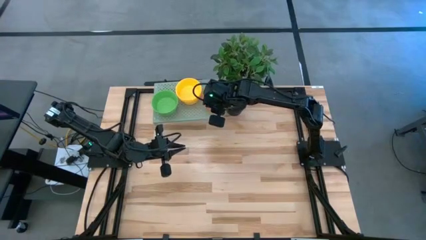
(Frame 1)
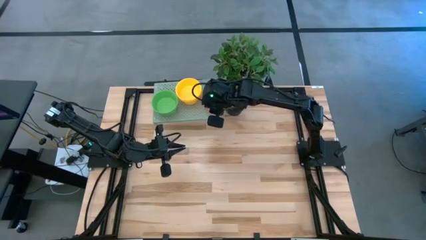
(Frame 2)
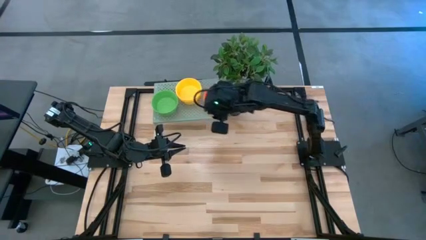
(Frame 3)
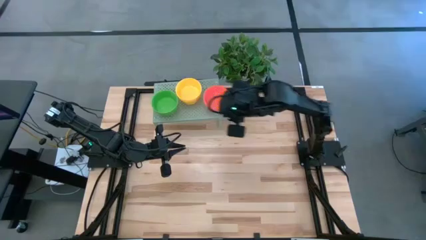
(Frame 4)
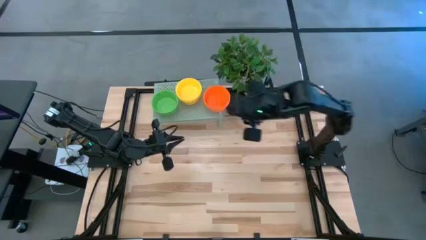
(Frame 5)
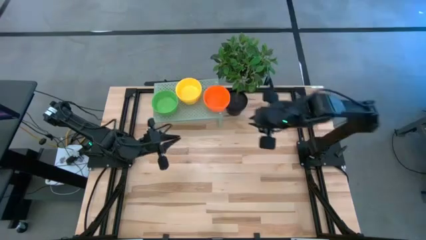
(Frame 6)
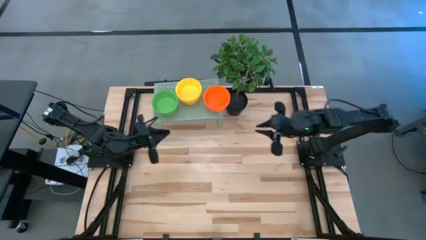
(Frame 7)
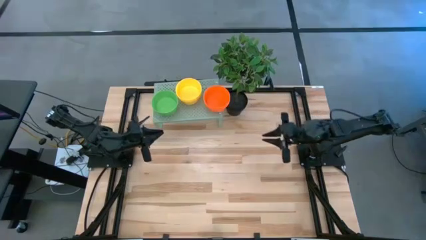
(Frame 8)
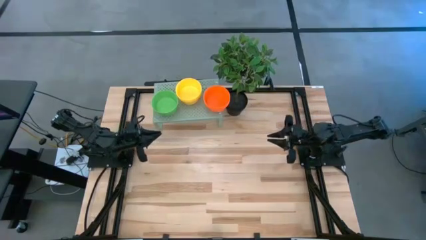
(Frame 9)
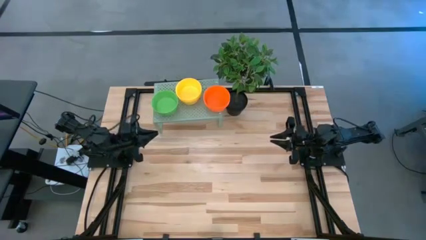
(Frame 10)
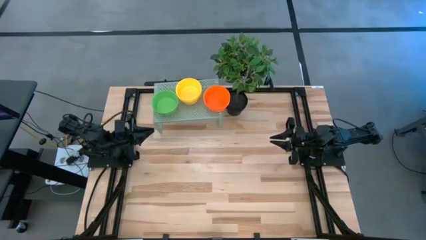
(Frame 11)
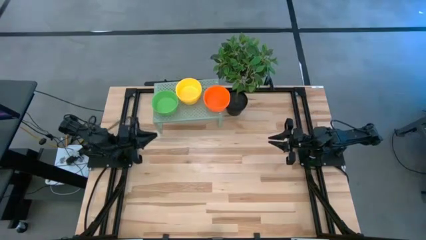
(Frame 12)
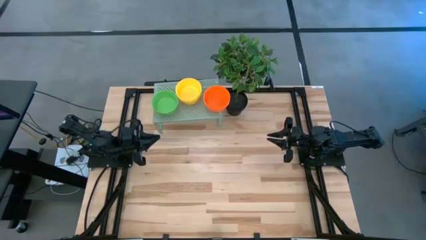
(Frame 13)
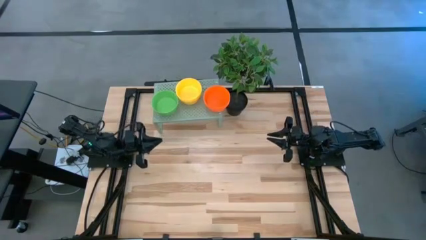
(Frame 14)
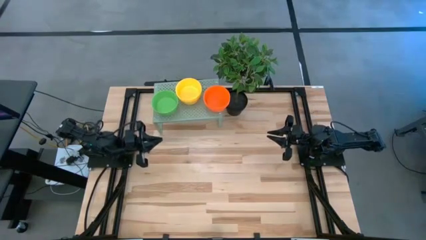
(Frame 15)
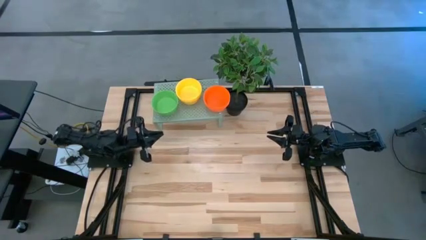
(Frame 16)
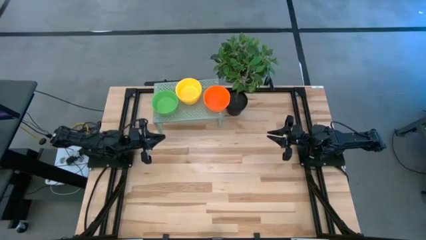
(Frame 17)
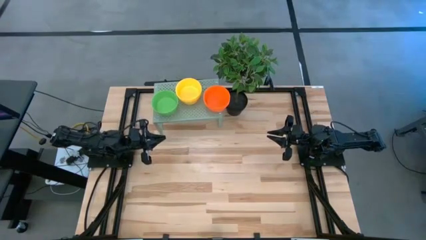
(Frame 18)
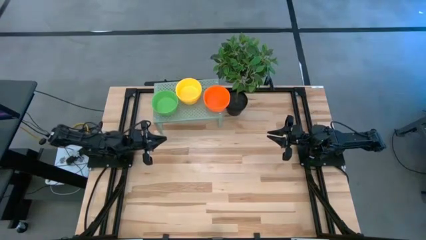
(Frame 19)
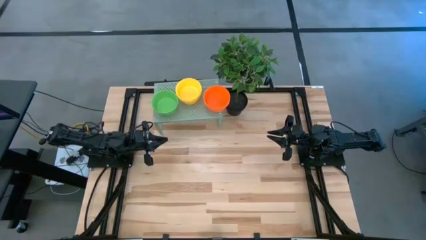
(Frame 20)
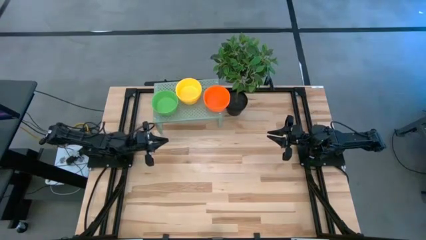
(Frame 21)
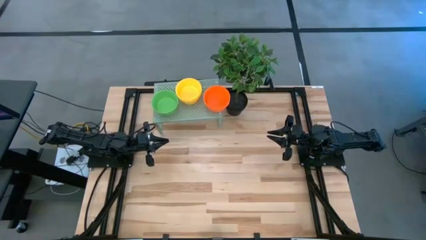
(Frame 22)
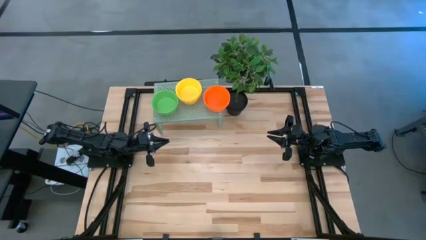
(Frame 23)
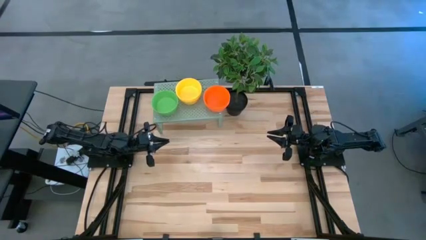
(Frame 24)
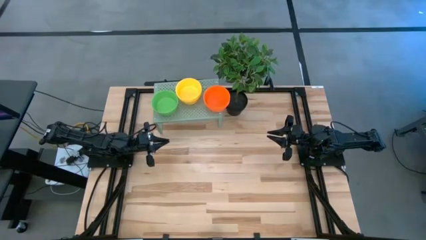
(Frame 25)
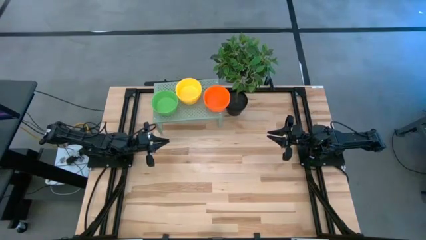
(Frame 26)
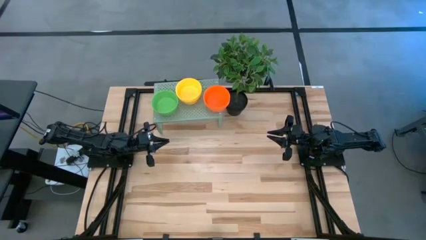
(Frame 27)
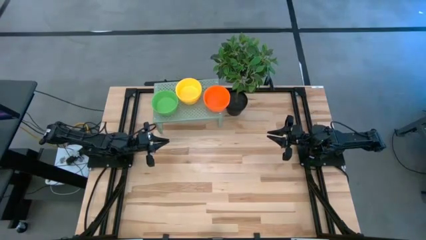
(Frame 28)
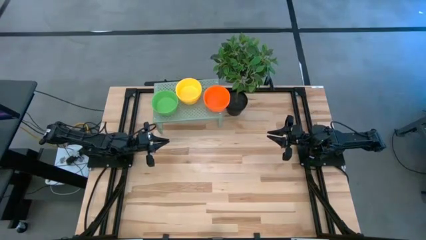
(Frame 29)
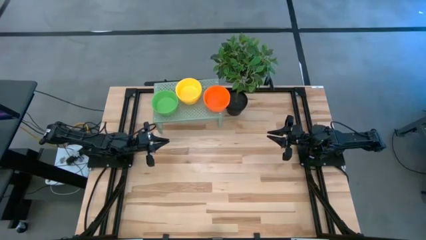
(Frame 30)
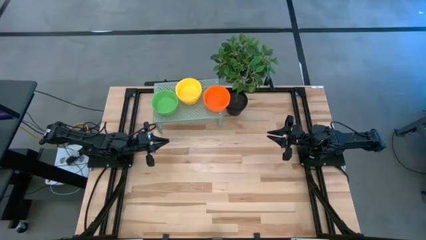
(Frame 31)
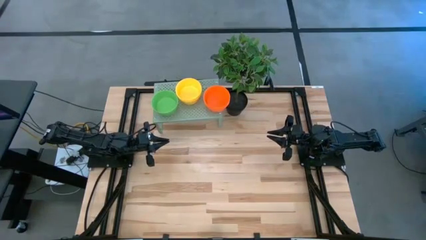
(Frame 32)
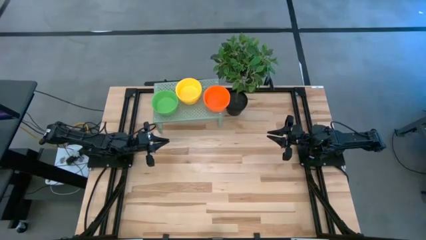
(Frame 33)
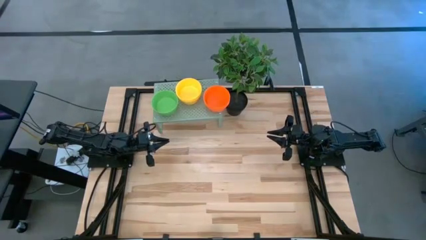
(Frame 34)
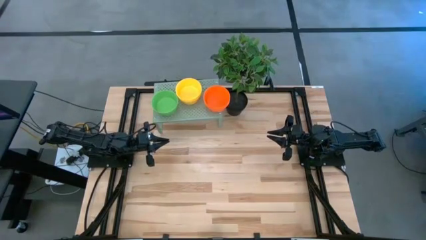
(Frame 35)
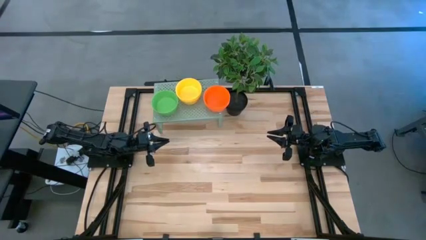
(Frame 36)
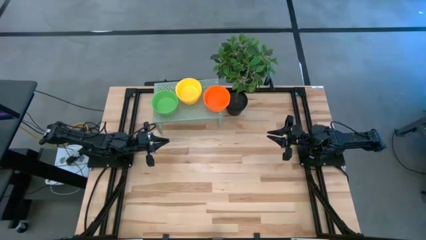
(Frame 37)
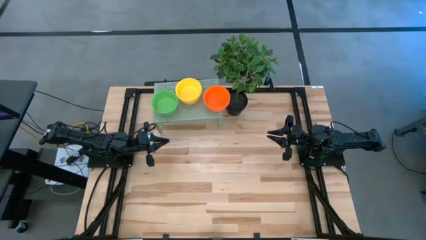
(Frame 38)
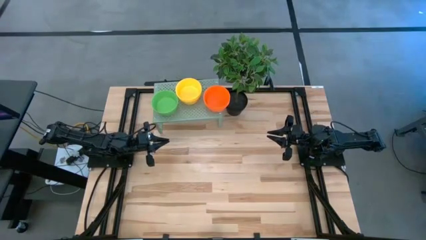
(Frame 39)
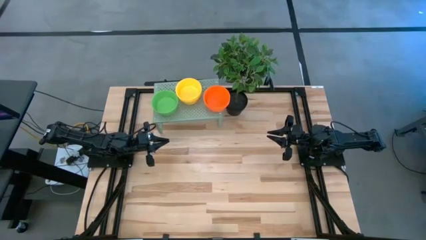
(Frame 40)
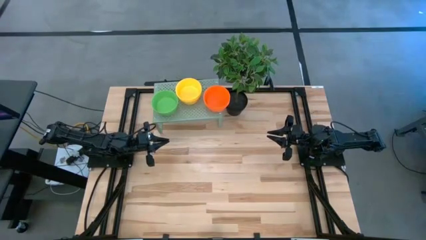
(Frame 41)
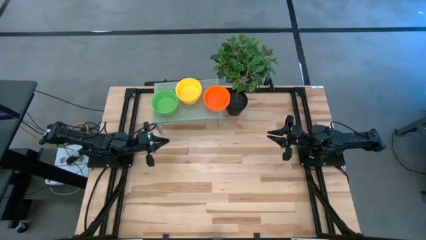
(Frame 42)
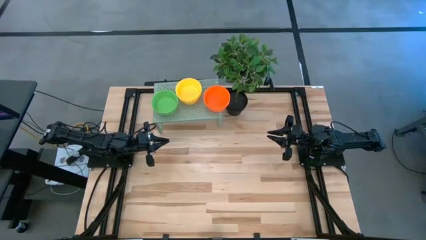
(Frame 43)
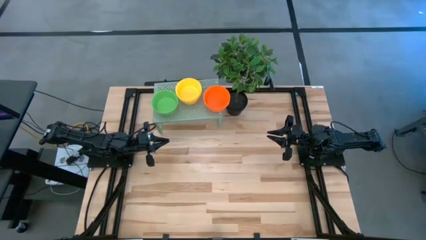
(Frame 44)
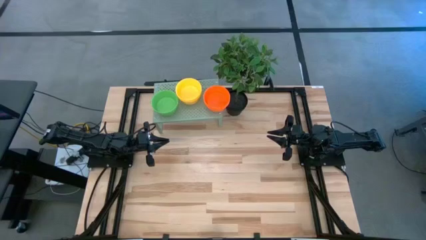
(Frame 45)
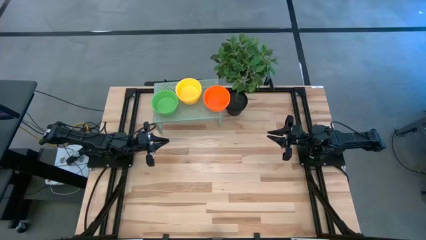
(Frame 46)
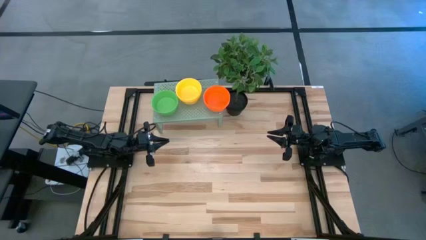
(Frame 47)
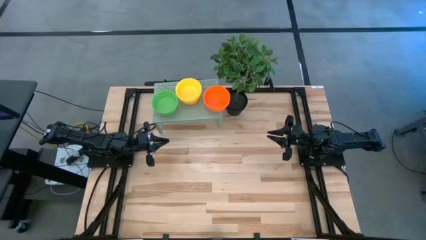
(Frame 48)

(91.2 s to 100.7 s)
Task: Pick & Place Mini bowls
Return to Home Position

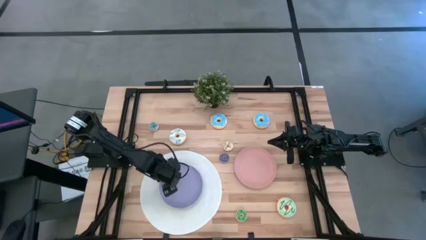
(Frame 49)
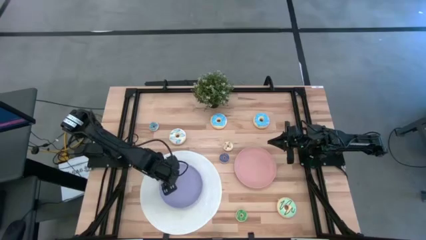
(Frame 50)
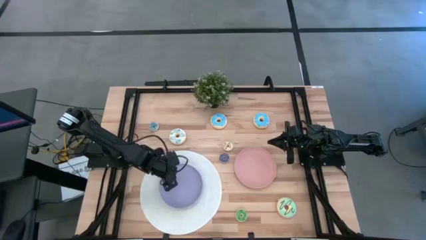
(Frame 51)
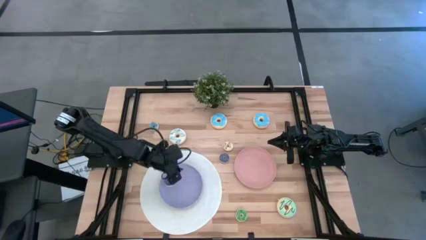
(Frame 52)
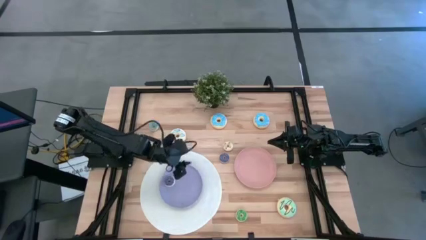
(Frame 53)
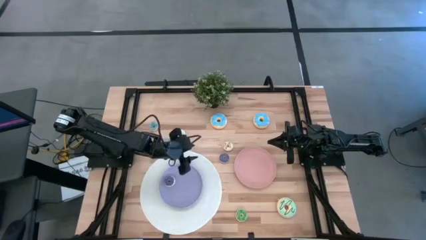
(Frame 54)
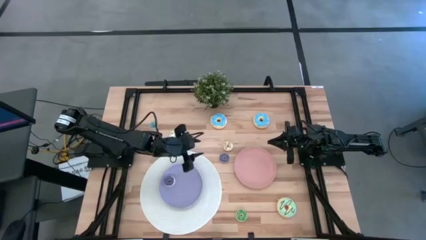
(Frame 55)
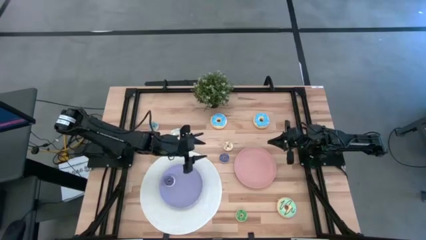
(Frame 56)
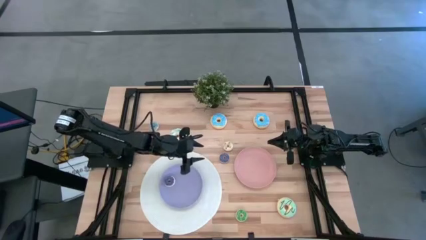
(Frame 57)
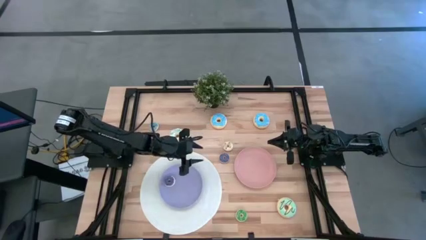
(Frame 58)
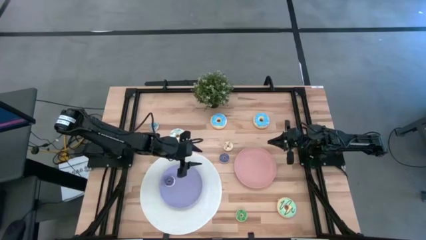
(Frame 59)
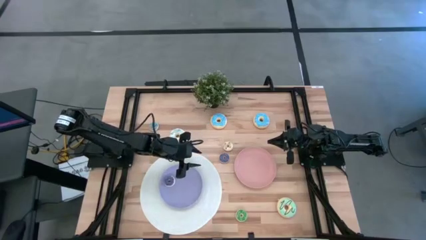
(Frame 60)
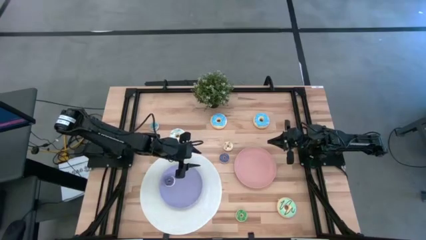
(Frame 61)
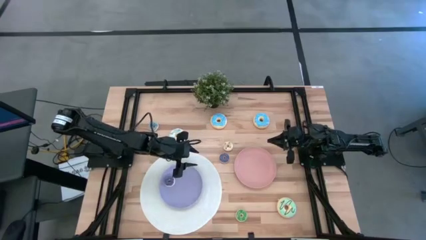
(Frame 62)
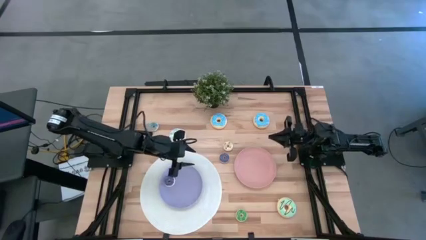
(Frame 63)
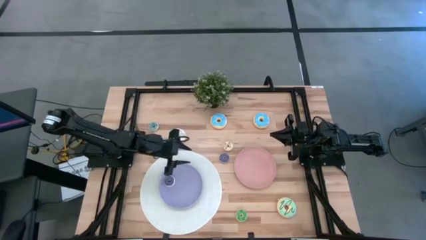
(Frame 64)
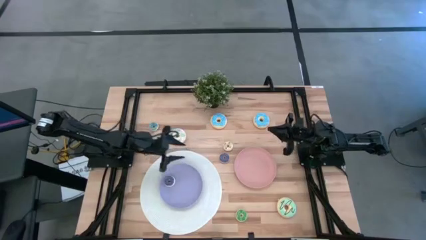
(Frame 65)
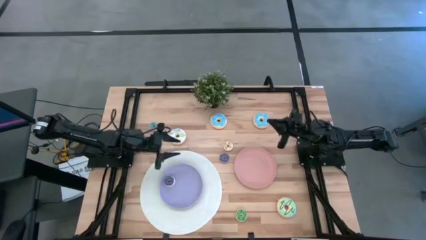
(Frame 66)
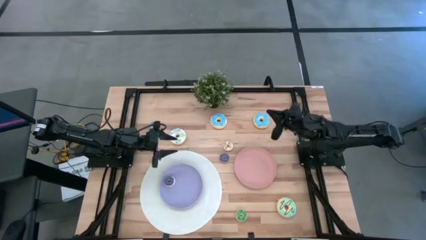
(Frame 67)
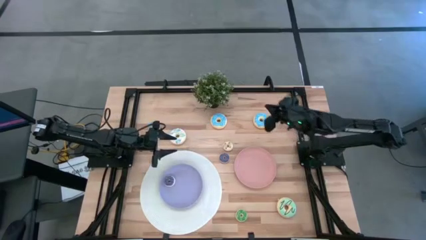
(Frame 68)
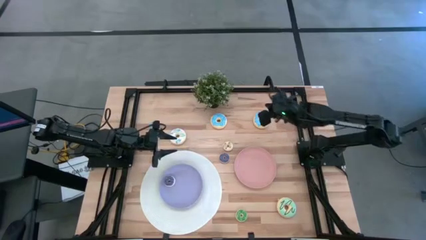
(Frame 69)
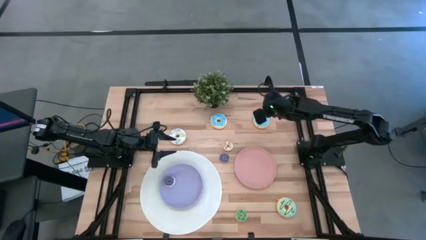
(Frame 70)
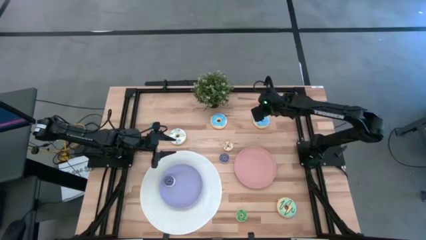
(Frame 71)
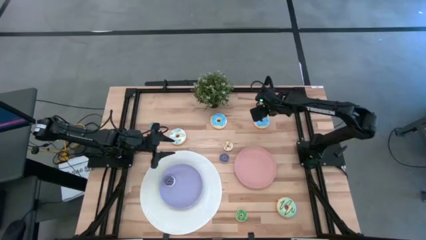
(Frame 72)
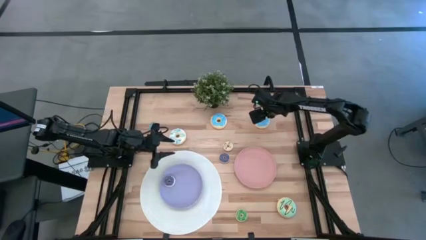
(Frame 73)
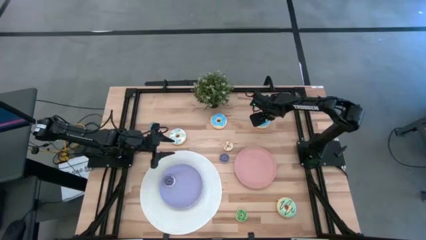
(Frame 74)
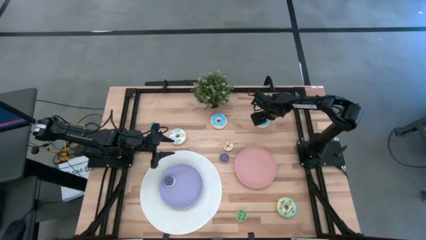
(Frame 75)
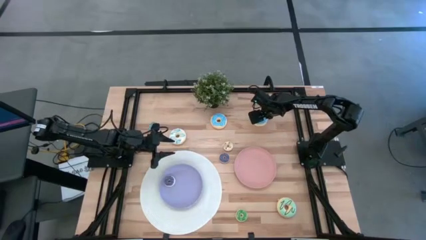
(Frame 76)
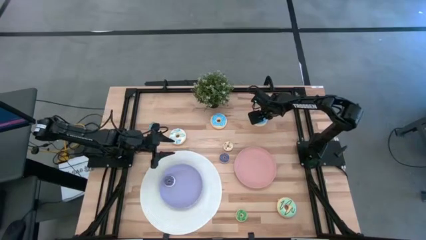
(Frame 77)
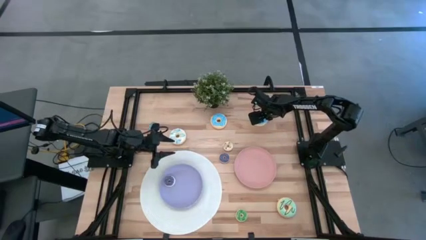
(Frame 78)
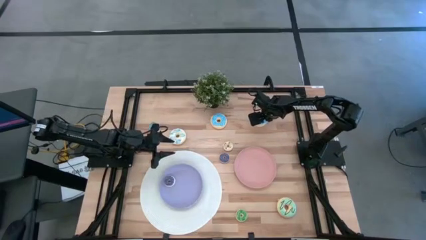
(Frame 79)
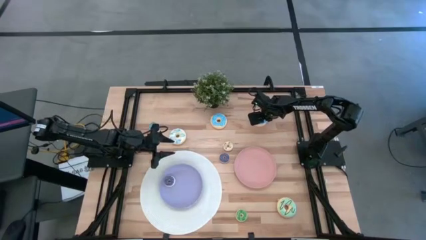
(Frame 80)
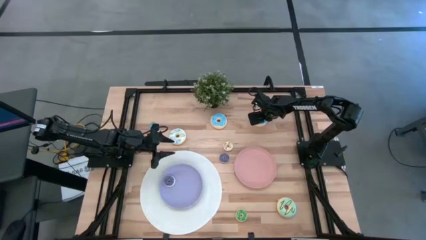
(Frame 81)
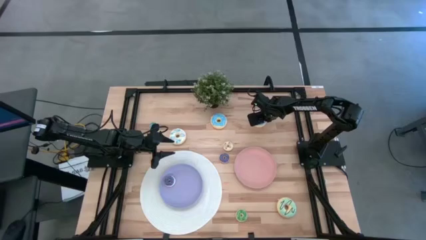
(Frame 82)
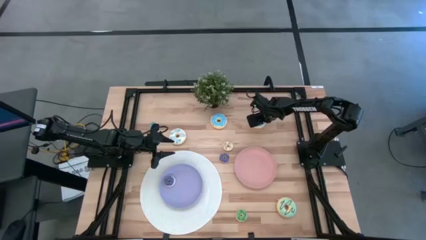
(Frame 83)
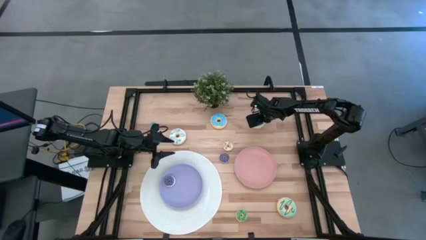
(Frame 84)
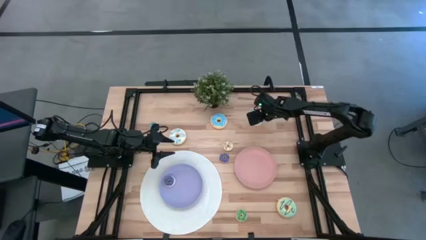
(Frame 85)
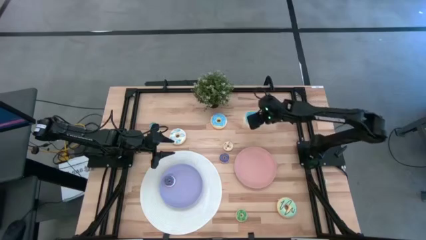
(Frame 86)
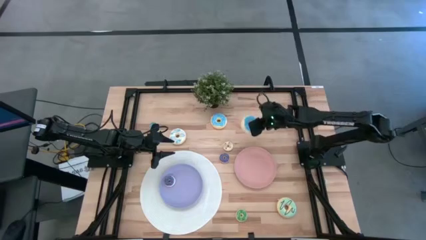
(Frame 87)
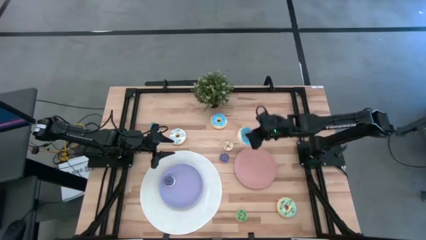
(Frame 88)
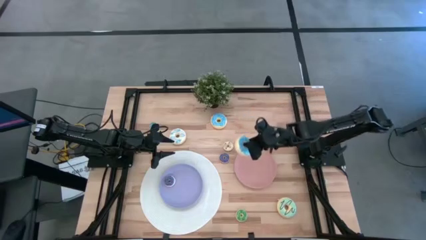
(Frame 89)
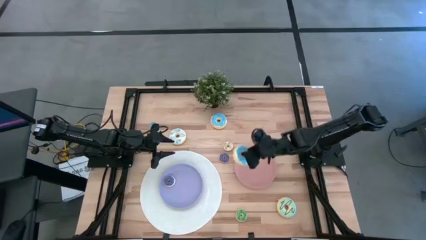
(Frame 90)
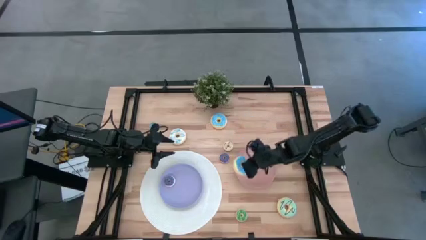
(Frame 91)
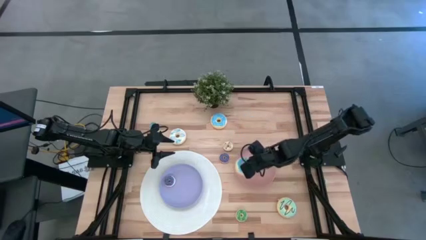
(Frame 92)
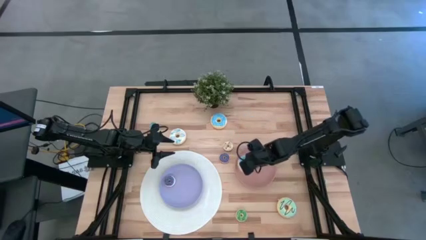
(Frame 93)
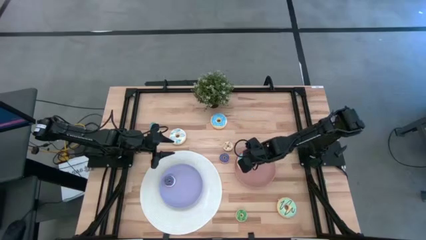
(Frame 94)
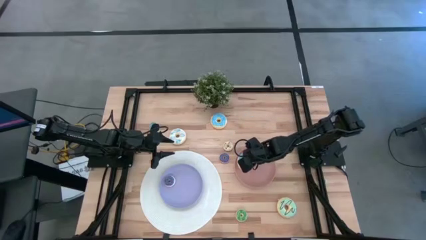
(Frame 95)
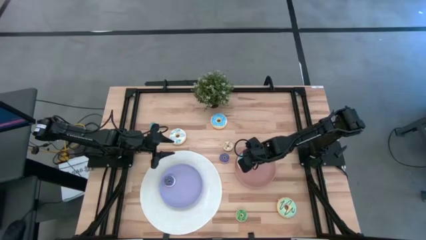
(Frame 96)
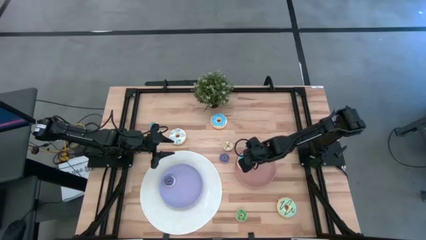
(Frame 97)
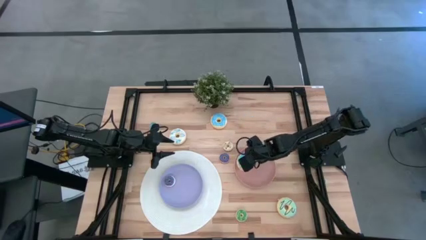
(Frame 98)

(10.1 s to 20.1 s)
Task: Pick & Place donuts
Put the right big blue donut on the pink plate
